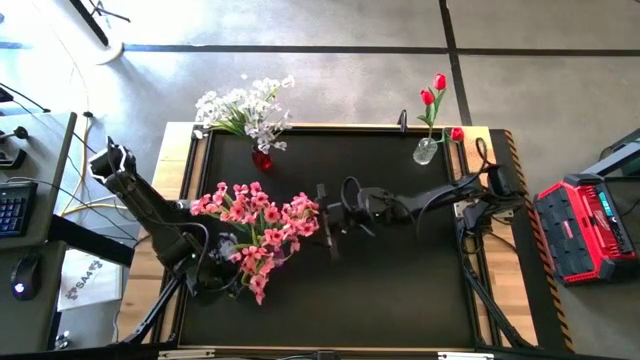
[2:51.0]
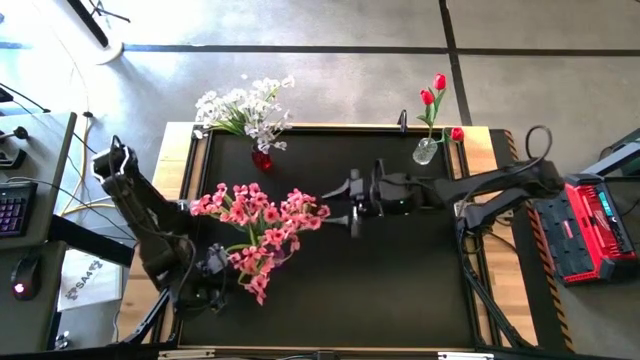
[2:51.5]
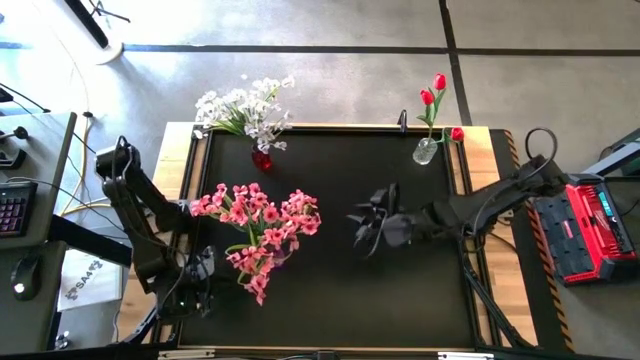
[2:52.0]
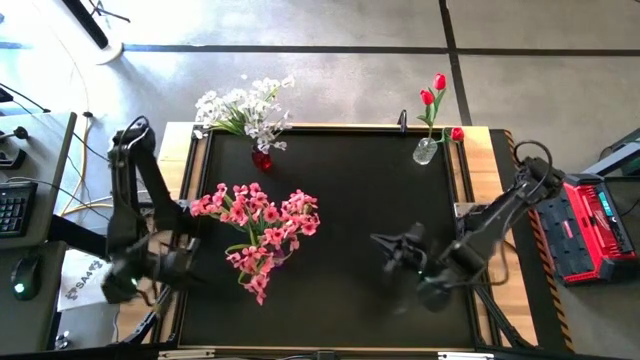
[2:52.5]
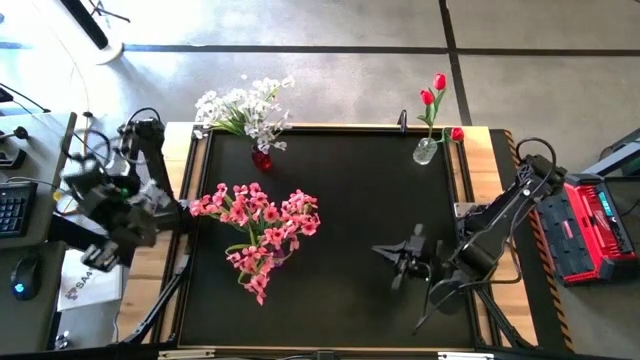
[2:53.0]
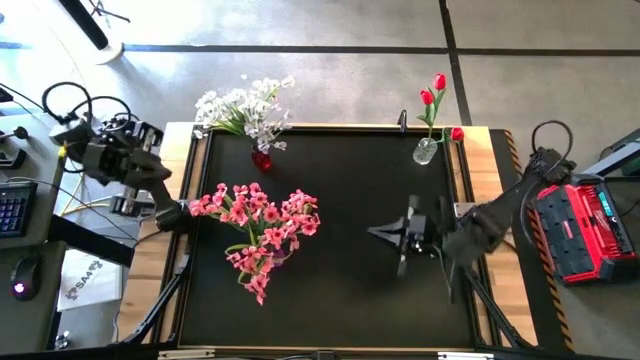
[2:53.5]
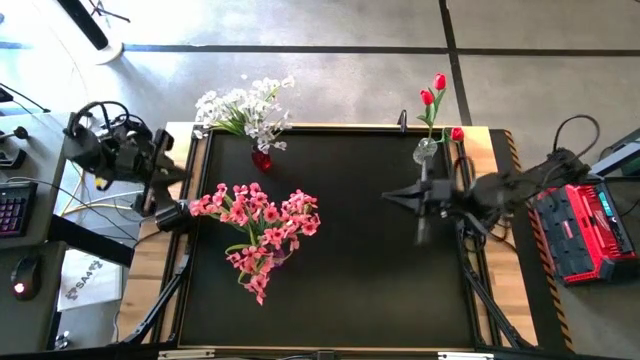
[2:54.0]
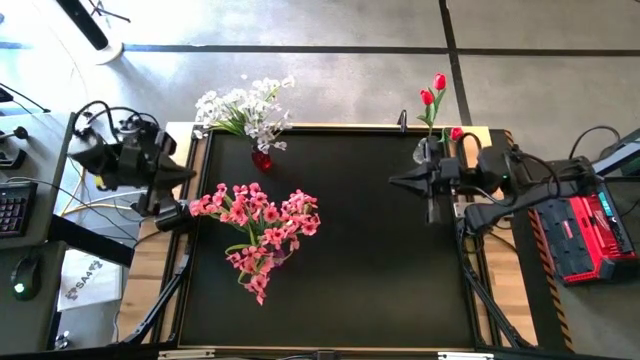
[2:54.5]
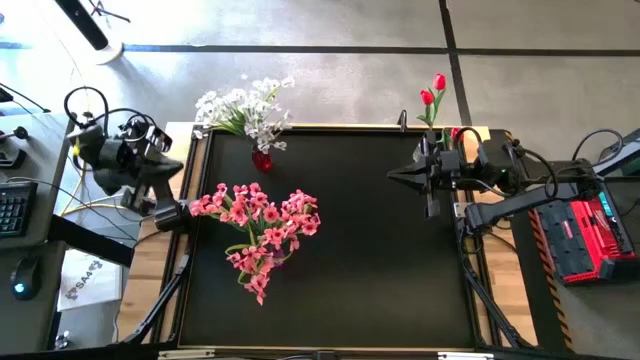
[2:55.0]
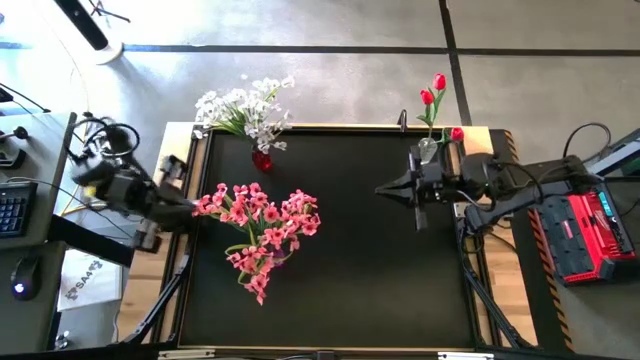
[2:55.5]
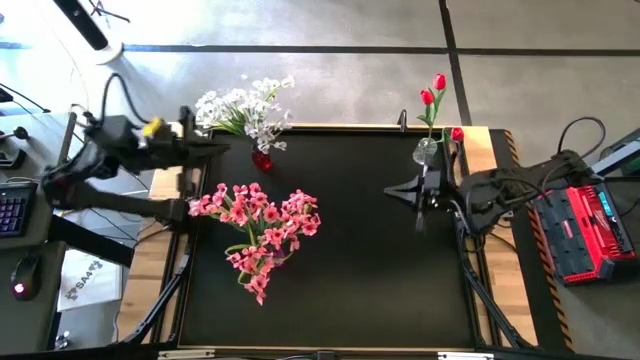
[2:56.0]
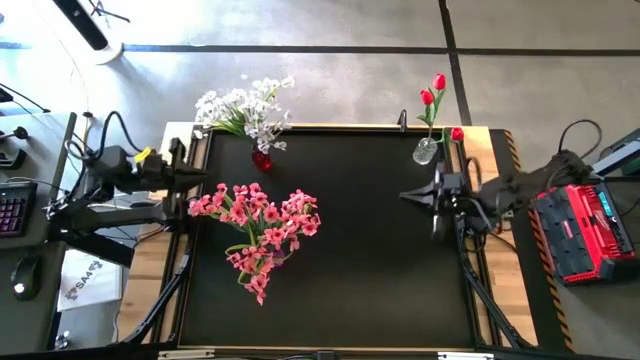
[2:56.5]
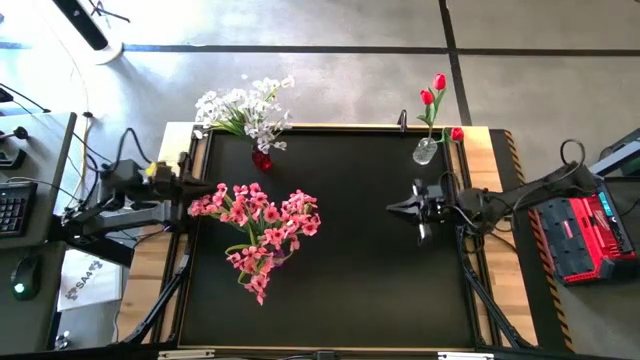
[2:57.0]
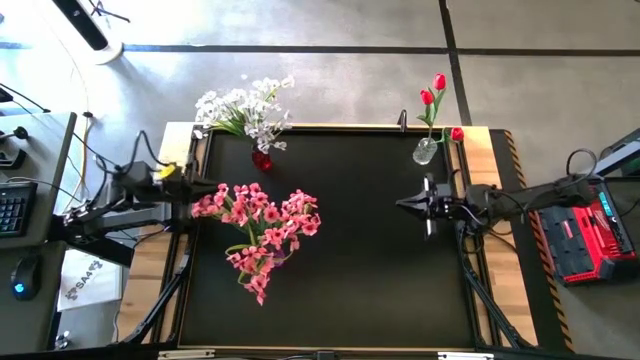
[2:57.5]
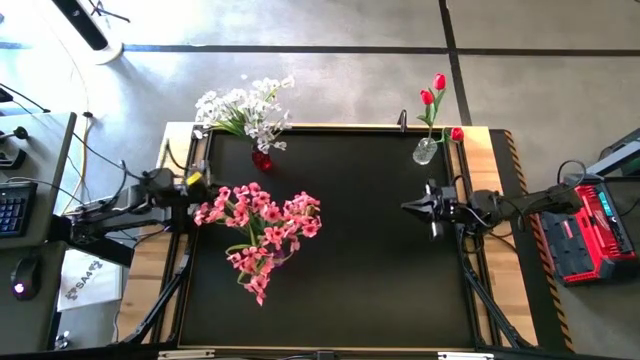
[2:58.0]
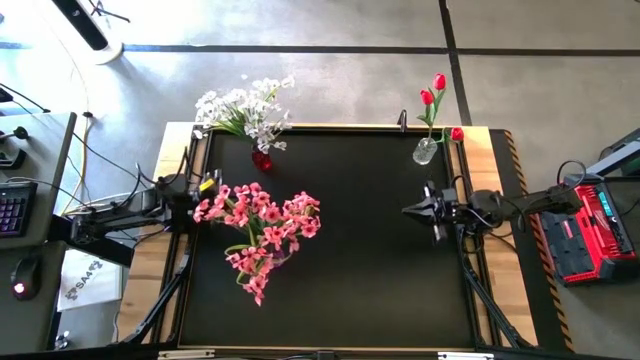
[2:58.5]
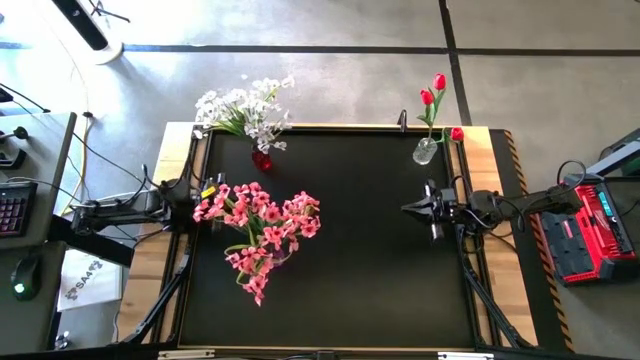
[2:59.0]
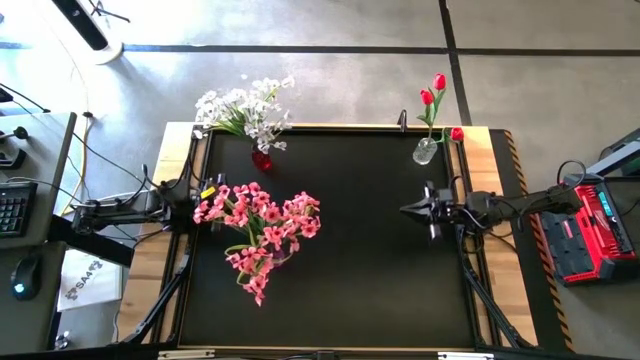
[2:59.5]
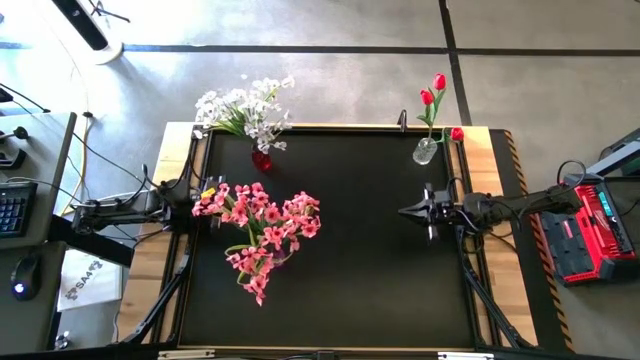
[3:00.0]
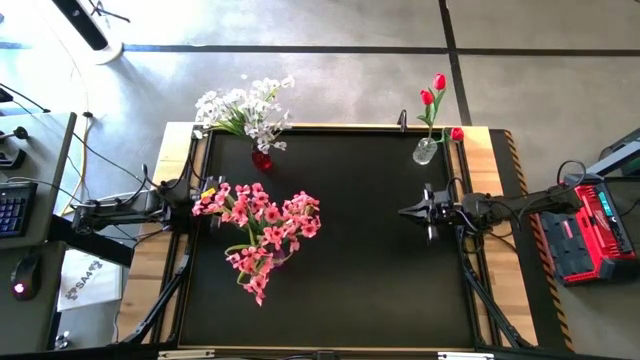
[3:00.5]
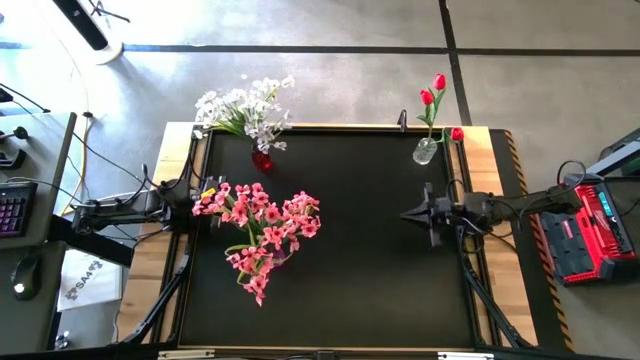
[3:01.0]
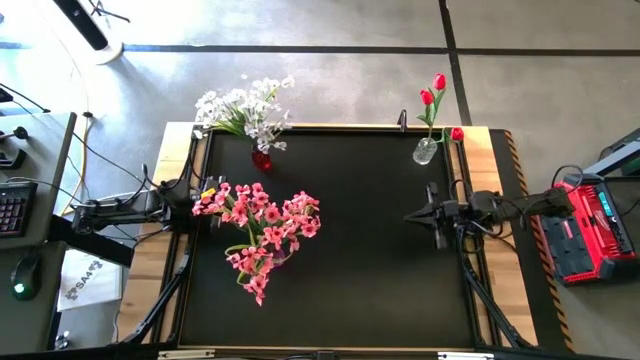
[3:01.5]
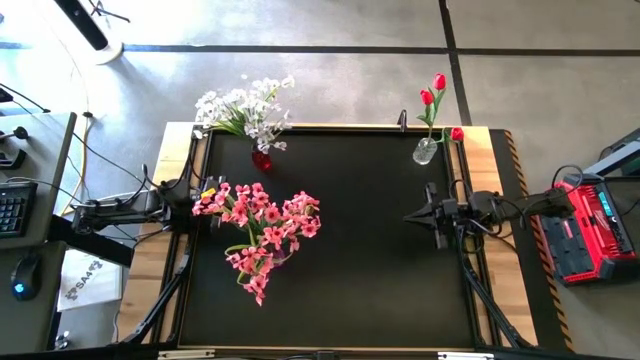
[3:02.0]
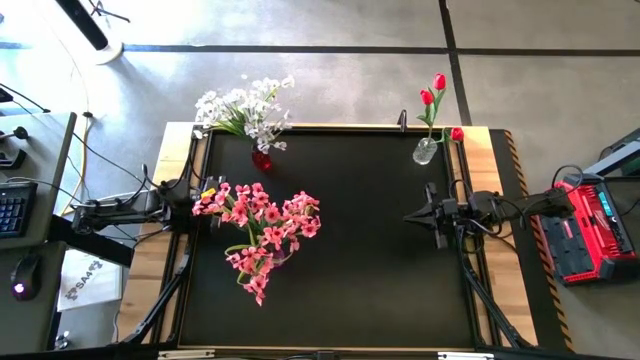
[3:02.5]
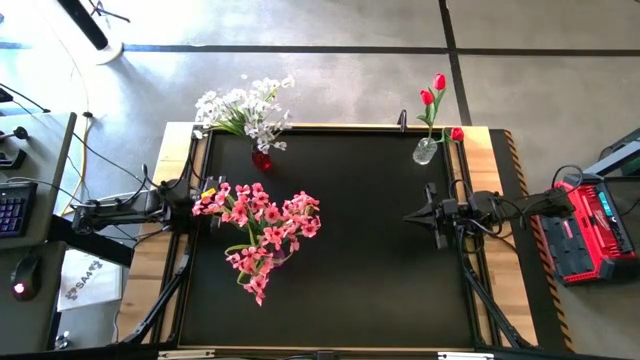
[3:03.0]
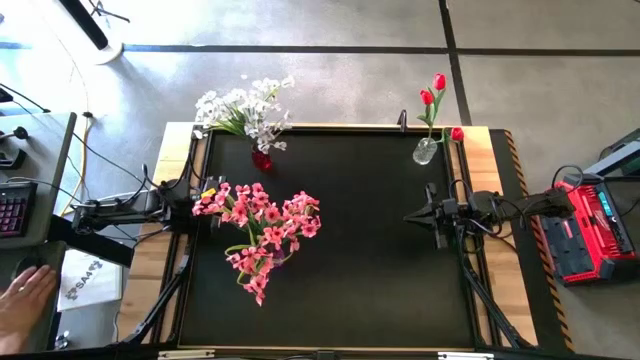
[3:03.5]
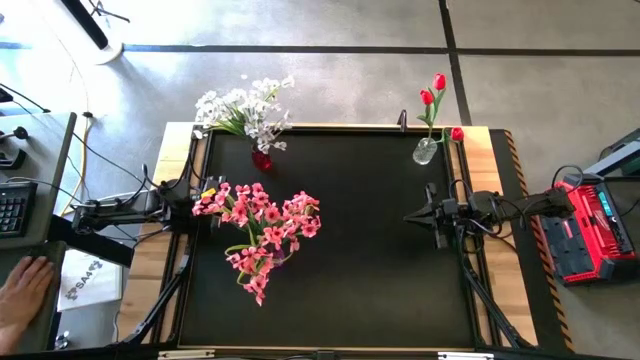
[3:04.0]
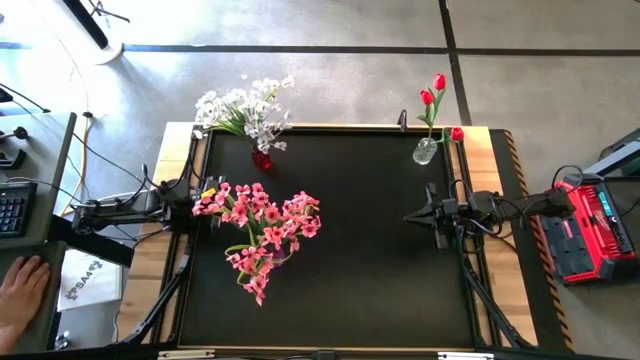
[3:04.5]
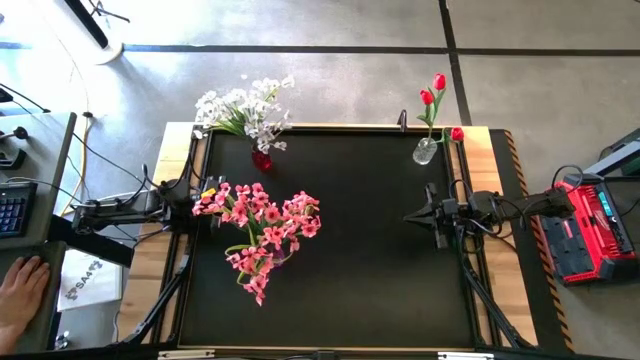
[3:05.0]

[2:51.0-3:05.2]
Task: Sort flowers into vase by color
Return to Home Position

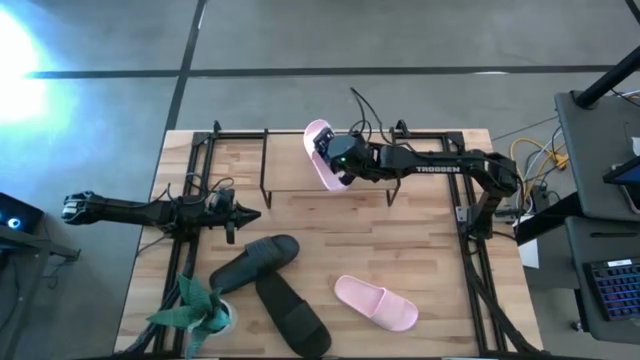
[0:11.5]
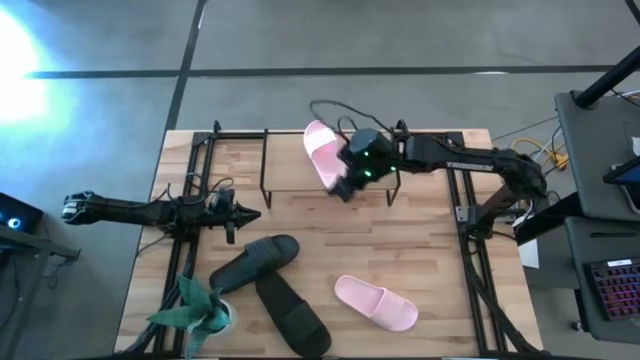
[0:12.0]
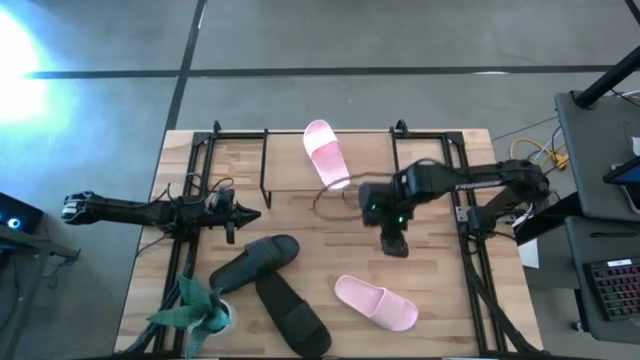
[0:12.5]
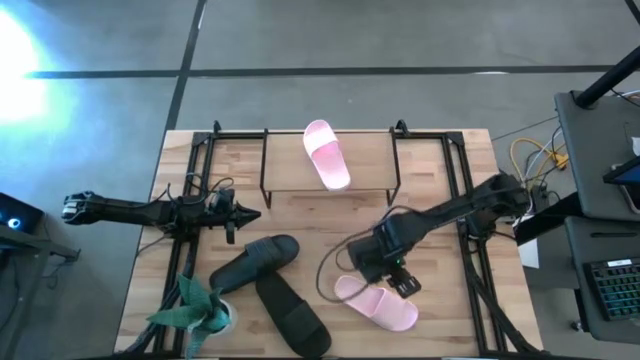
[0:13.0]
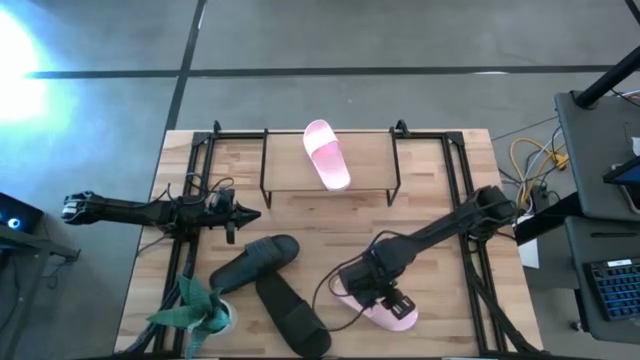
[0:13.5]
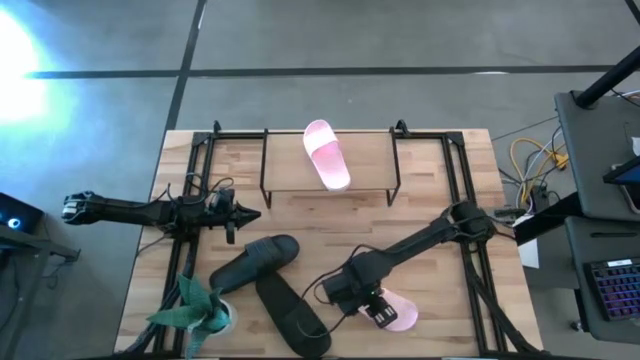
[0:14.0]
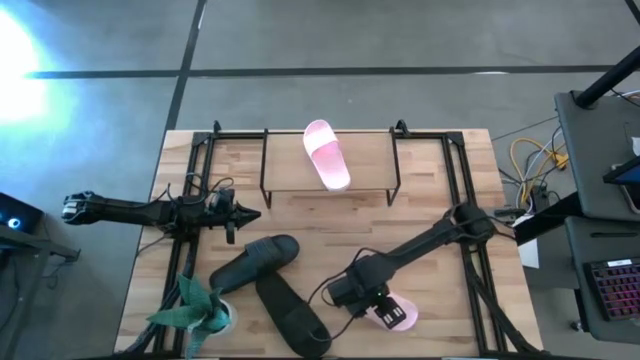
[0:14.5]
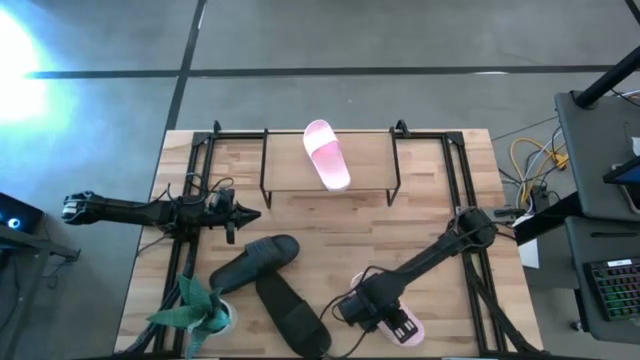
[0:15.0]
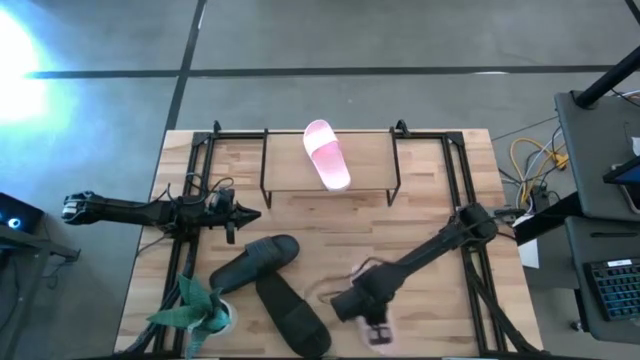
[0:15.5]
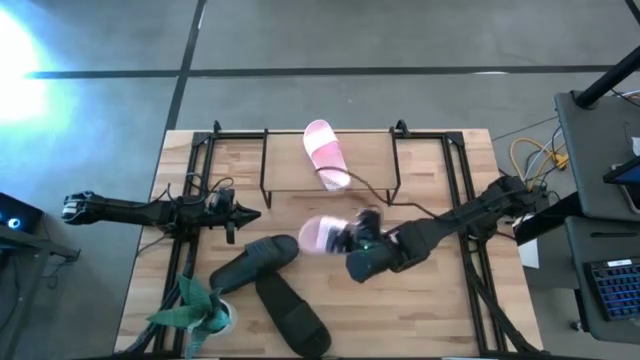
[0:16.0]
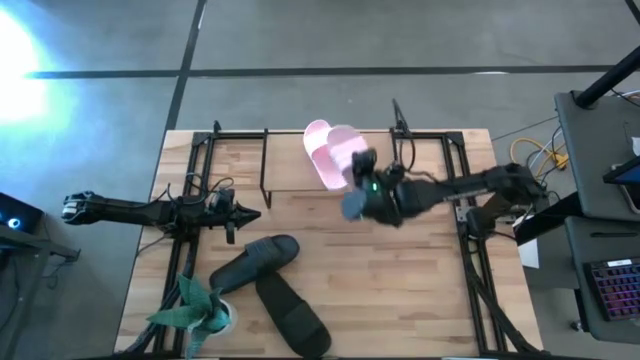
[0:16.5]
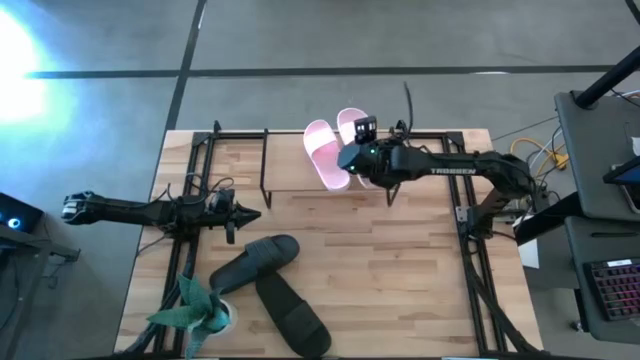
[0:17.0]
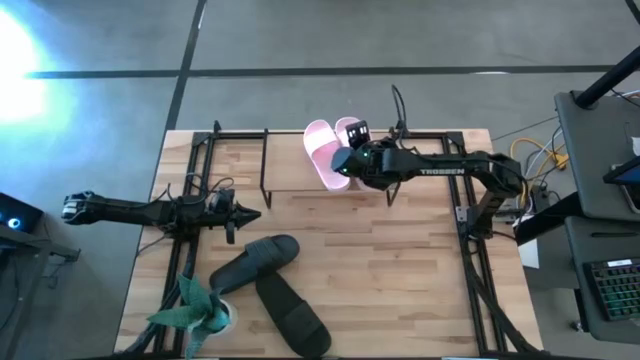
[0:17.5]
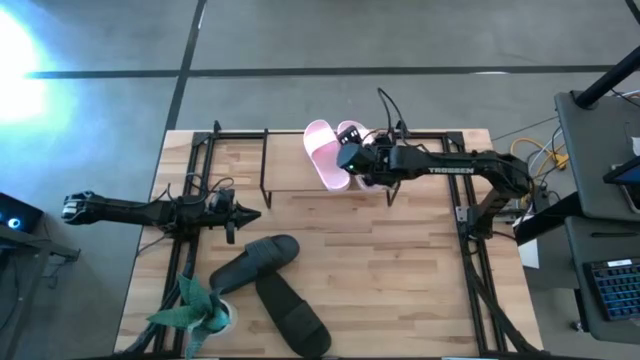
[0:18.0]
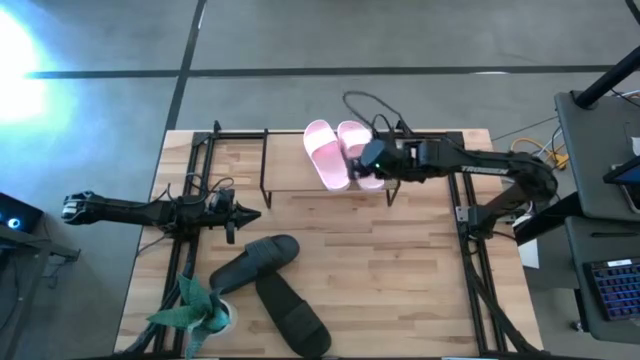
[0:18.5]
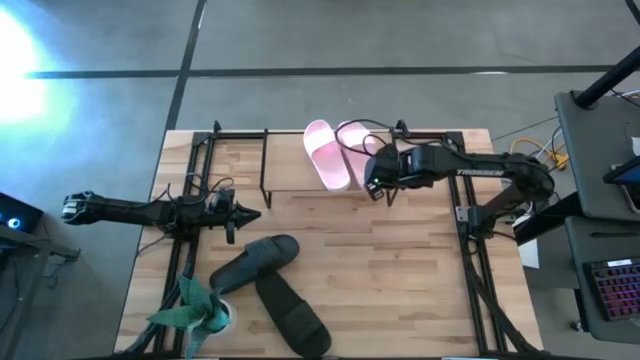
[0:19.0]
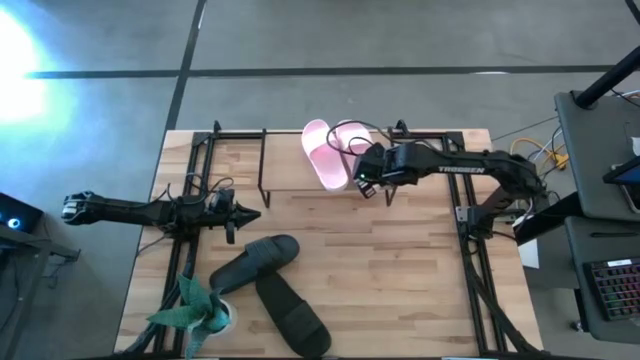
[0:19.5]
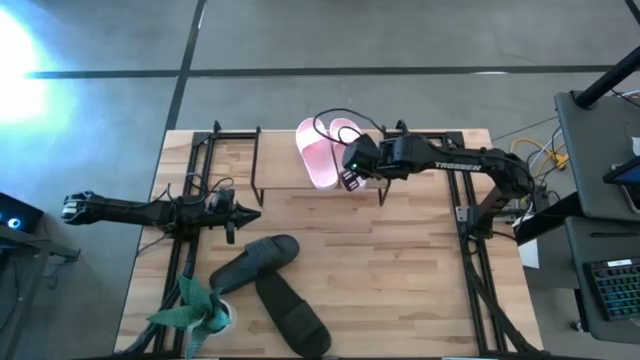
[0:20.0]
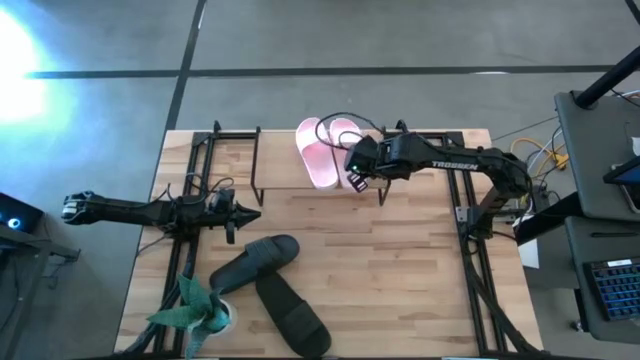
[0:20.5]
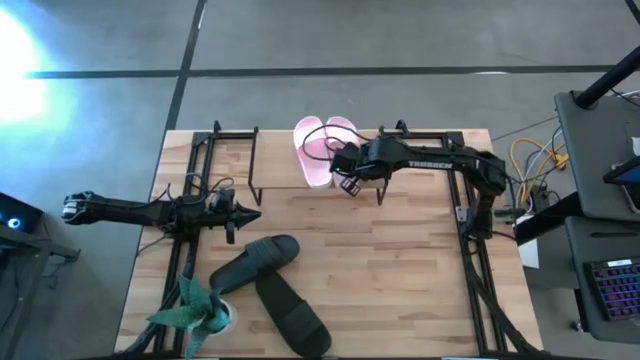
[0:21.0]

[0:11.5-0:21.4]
Task: Pick and place slides into the shelf
Put the pink slide on the shelf
